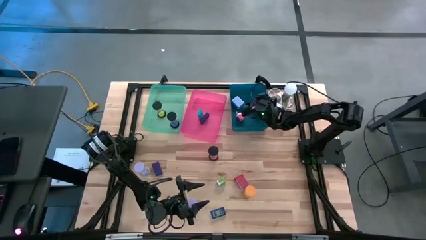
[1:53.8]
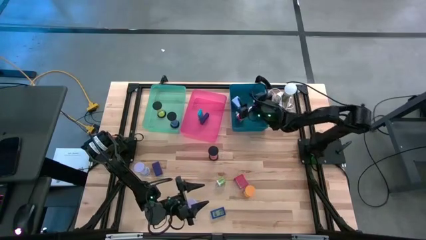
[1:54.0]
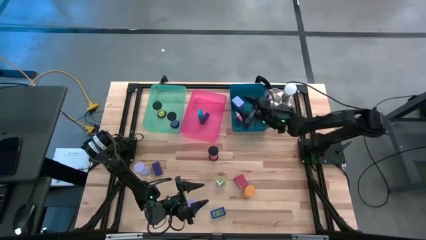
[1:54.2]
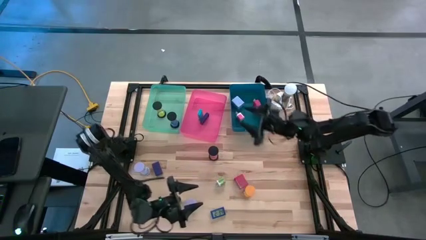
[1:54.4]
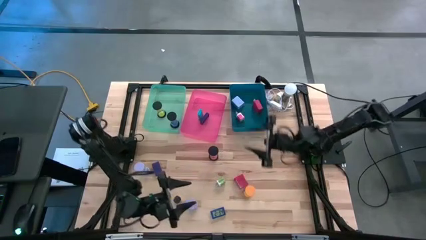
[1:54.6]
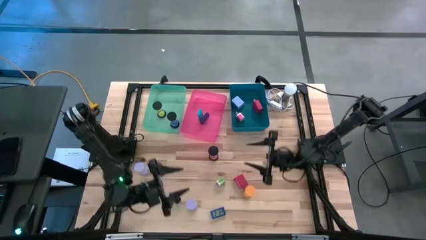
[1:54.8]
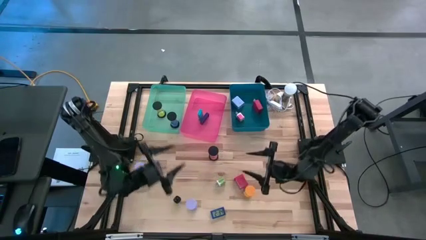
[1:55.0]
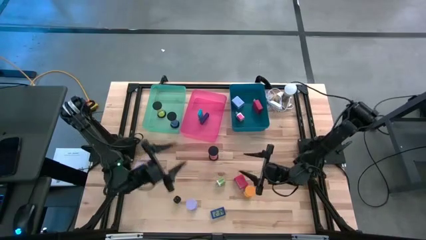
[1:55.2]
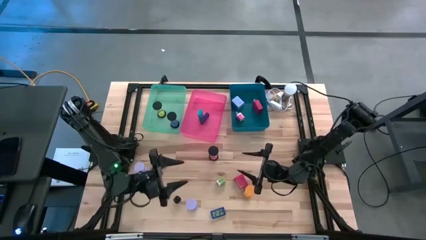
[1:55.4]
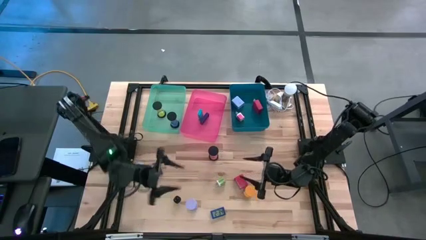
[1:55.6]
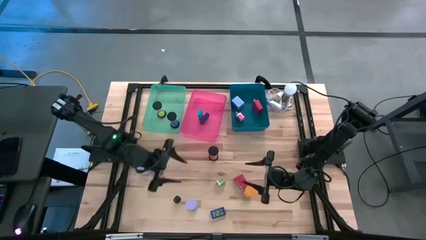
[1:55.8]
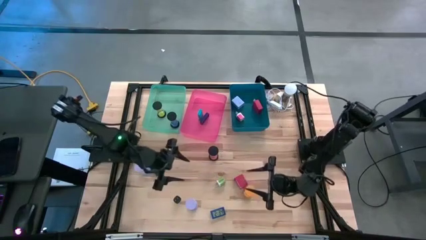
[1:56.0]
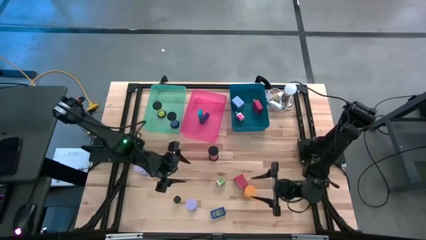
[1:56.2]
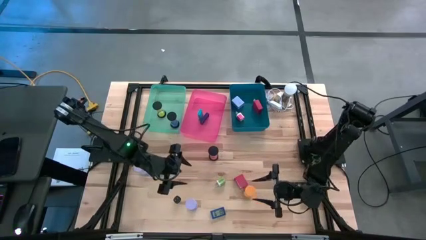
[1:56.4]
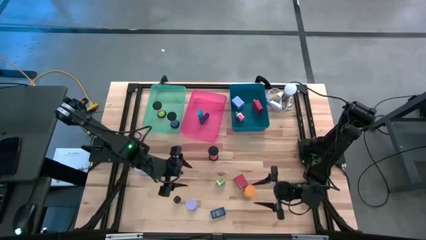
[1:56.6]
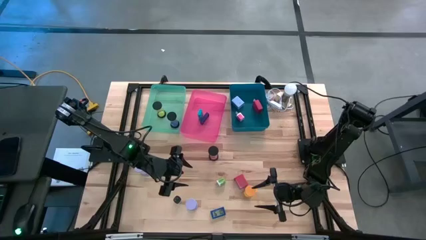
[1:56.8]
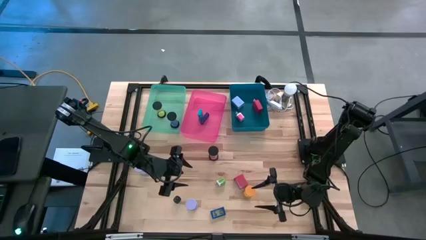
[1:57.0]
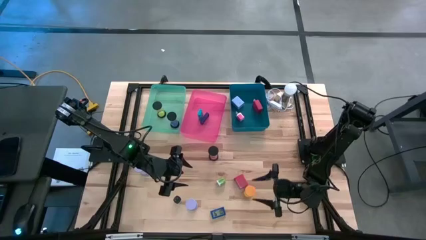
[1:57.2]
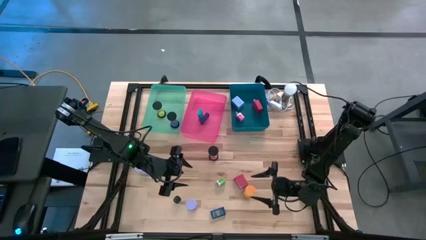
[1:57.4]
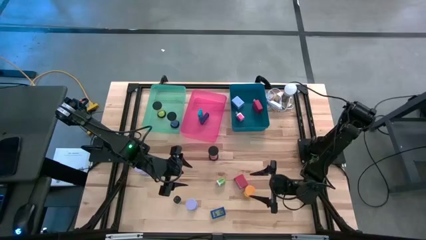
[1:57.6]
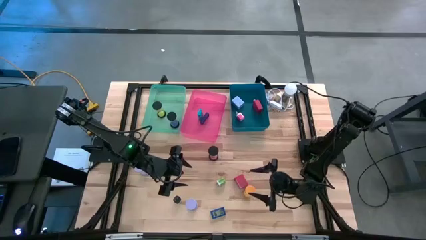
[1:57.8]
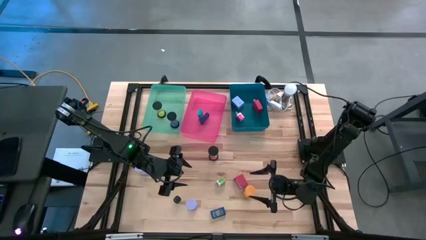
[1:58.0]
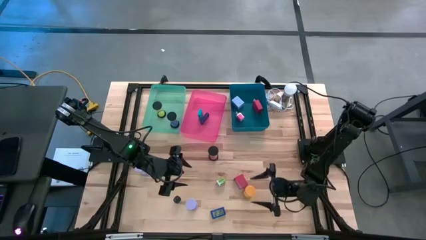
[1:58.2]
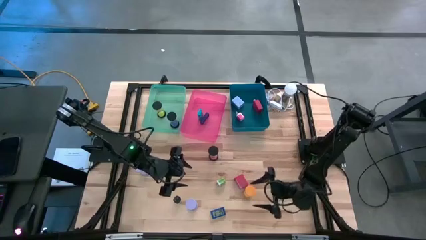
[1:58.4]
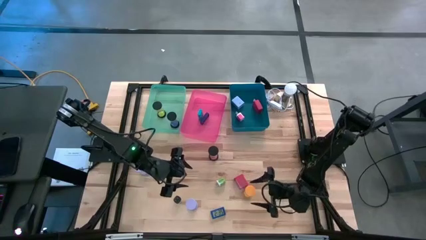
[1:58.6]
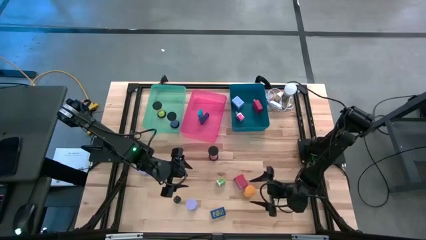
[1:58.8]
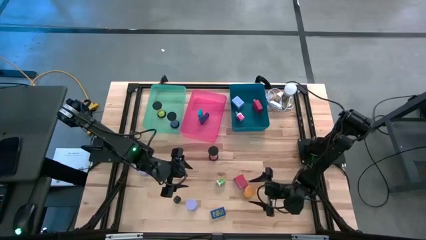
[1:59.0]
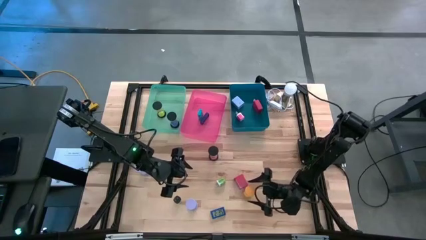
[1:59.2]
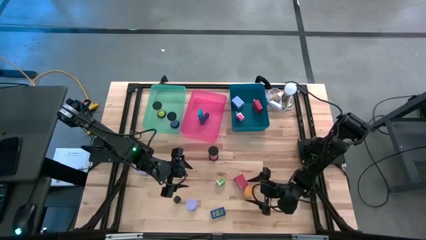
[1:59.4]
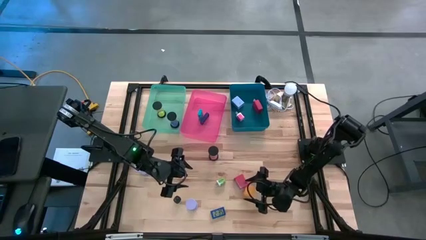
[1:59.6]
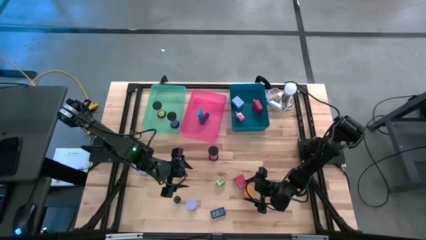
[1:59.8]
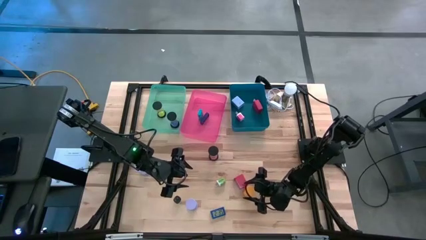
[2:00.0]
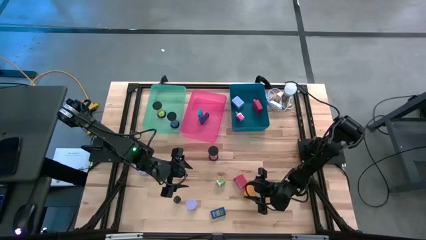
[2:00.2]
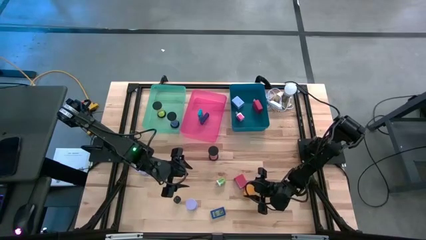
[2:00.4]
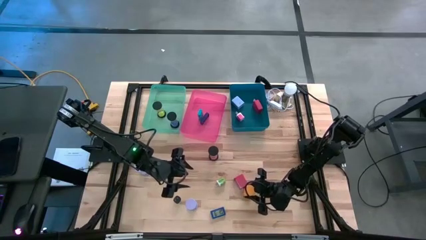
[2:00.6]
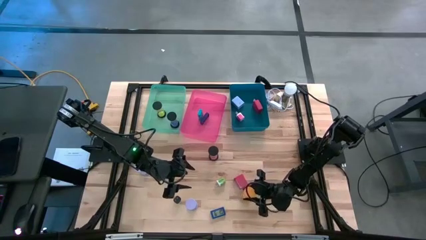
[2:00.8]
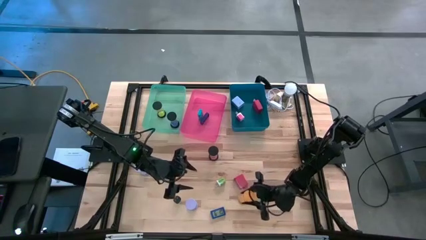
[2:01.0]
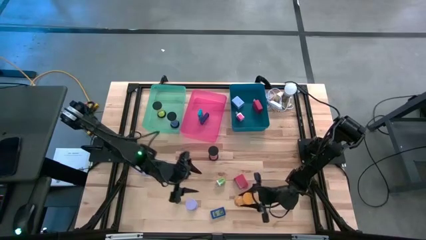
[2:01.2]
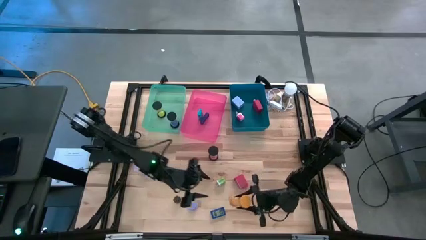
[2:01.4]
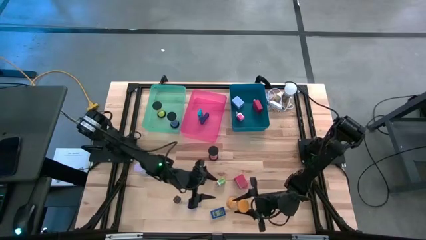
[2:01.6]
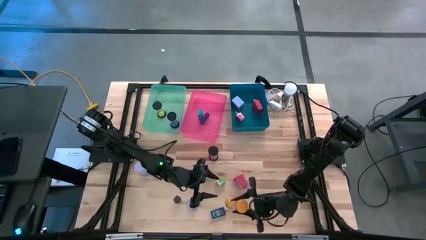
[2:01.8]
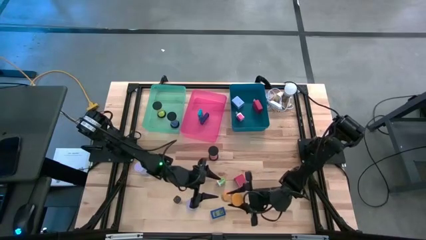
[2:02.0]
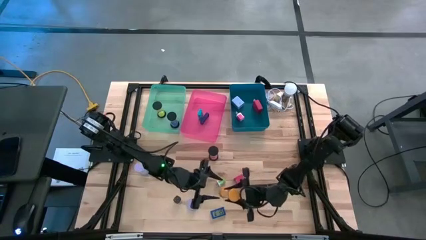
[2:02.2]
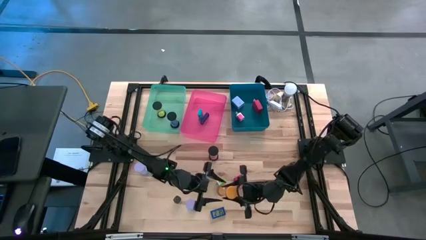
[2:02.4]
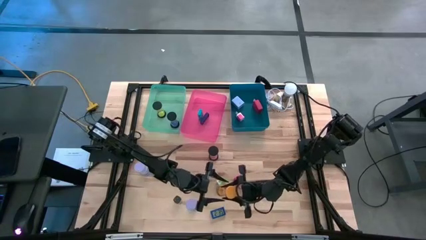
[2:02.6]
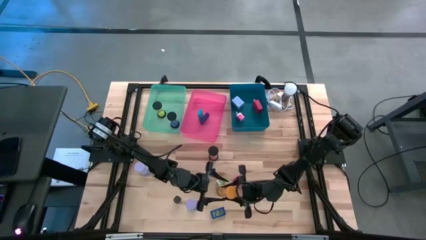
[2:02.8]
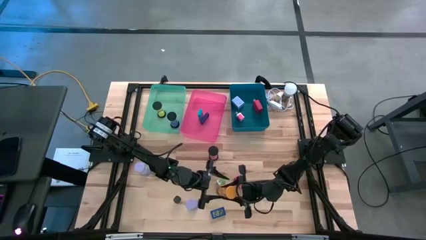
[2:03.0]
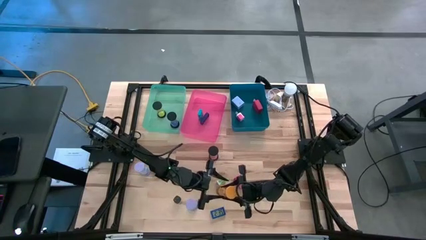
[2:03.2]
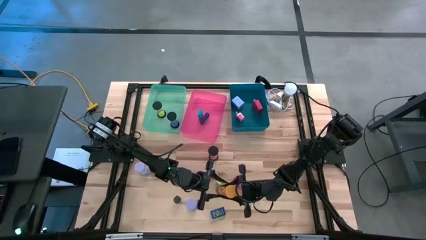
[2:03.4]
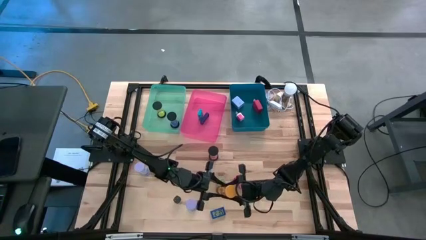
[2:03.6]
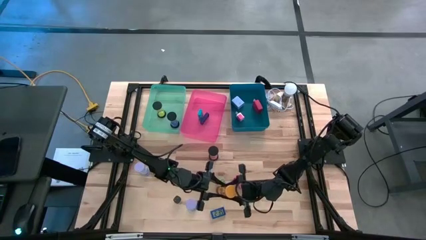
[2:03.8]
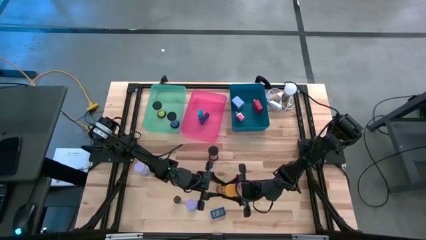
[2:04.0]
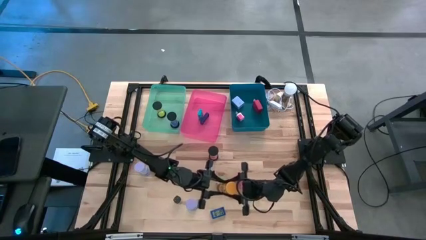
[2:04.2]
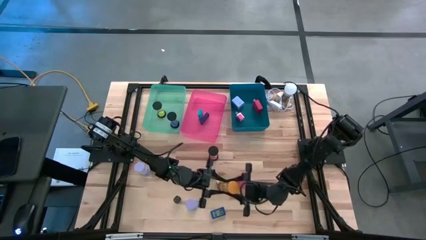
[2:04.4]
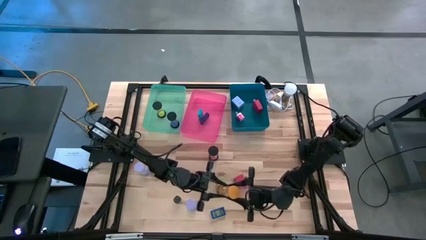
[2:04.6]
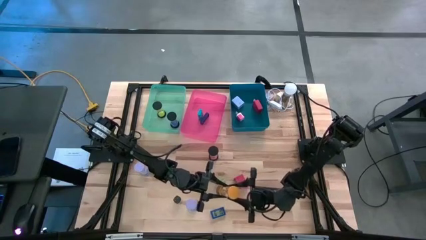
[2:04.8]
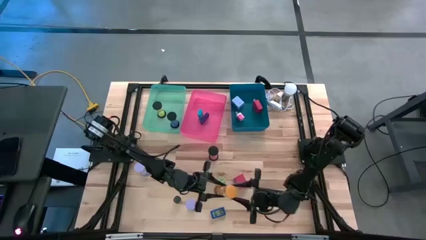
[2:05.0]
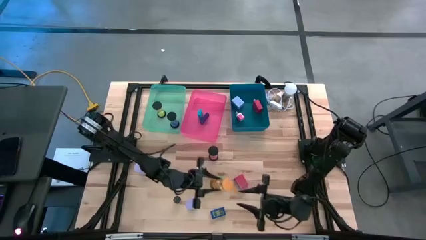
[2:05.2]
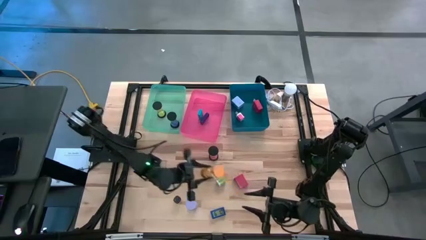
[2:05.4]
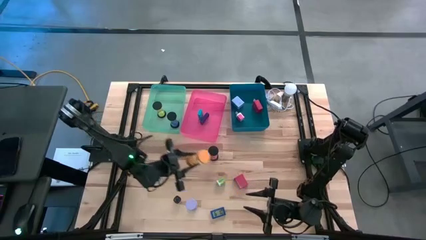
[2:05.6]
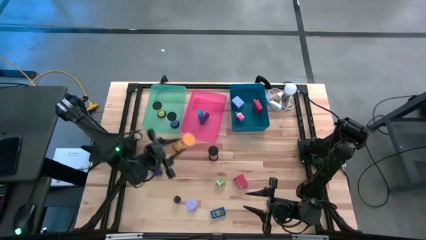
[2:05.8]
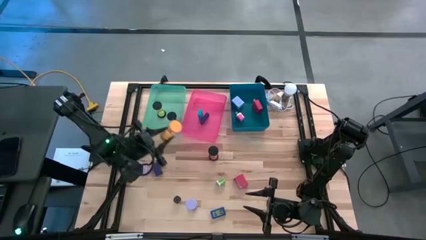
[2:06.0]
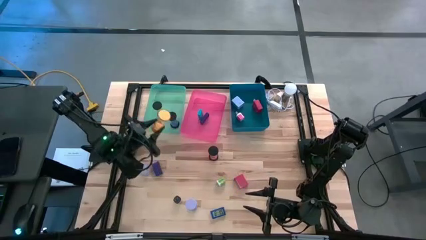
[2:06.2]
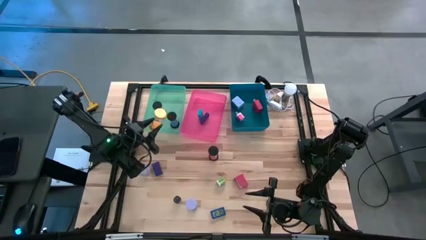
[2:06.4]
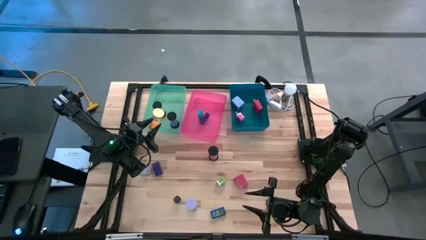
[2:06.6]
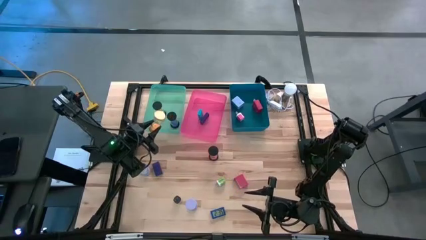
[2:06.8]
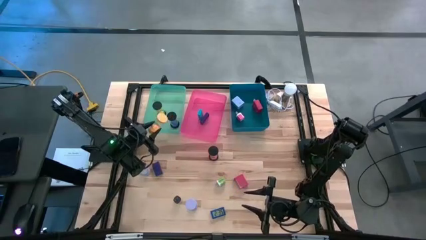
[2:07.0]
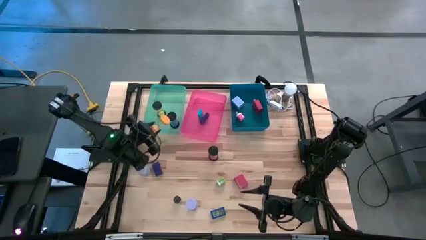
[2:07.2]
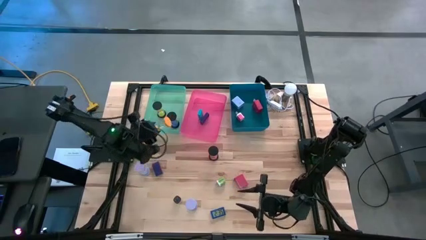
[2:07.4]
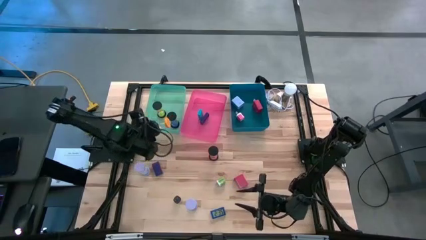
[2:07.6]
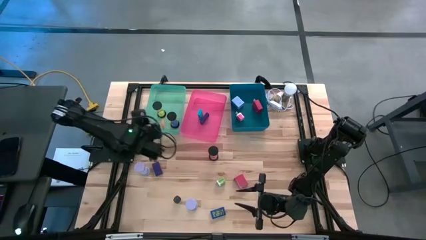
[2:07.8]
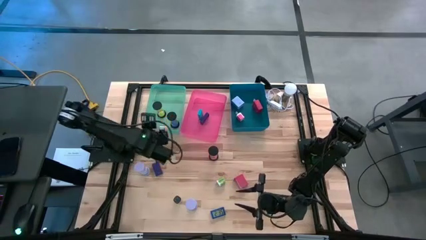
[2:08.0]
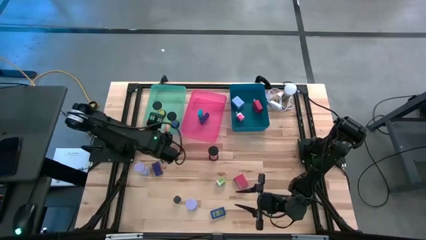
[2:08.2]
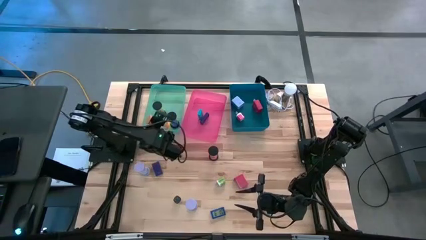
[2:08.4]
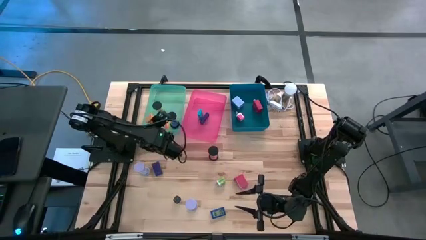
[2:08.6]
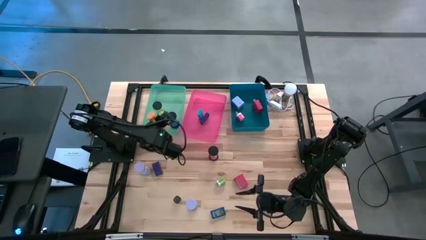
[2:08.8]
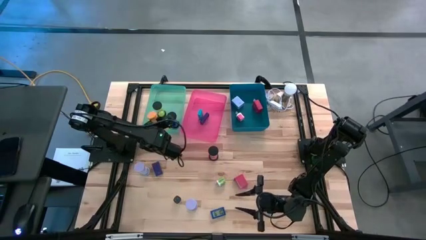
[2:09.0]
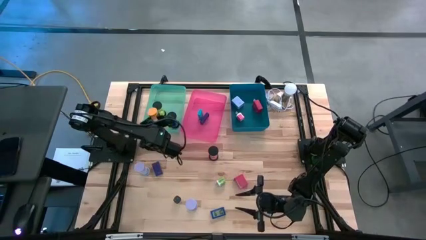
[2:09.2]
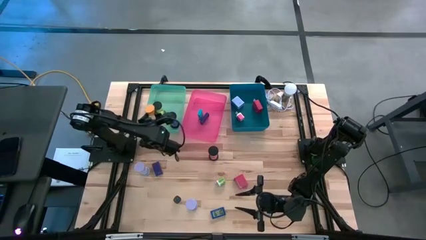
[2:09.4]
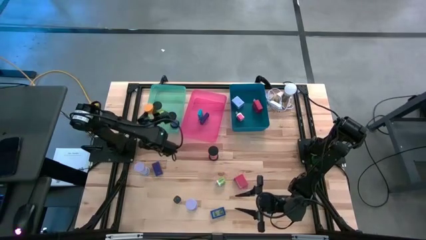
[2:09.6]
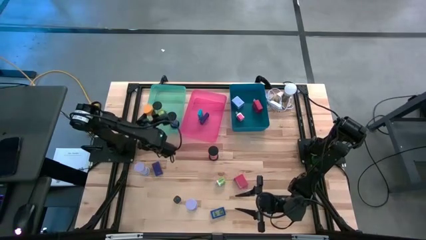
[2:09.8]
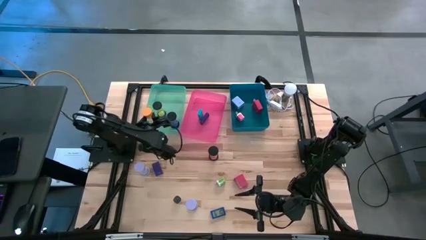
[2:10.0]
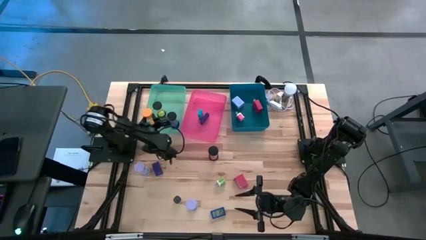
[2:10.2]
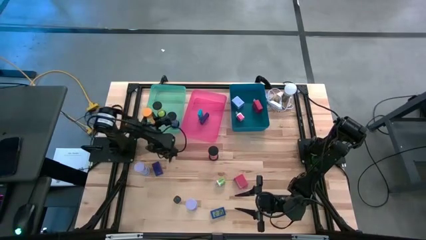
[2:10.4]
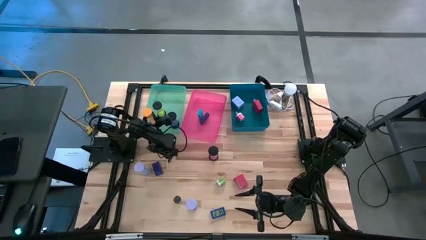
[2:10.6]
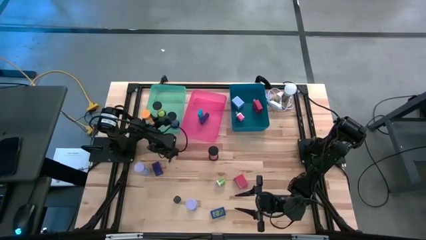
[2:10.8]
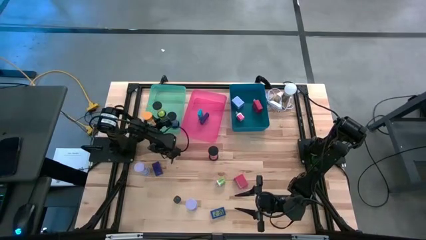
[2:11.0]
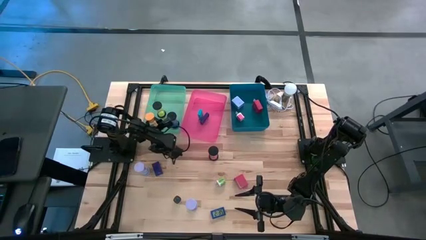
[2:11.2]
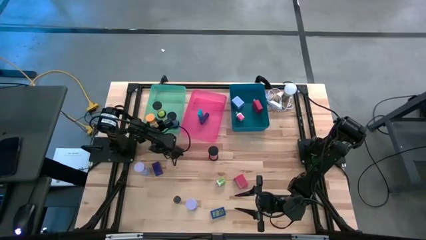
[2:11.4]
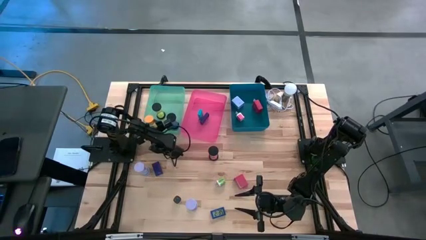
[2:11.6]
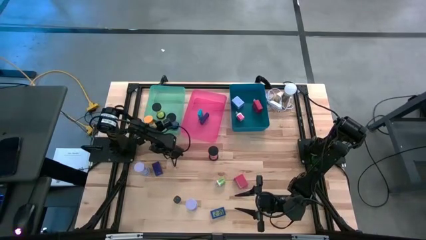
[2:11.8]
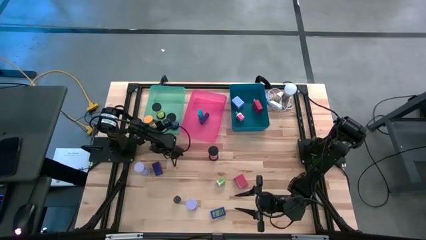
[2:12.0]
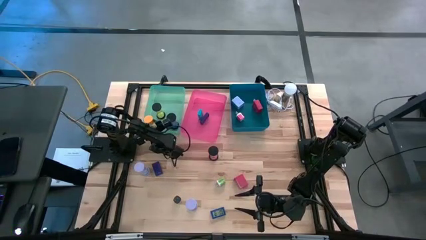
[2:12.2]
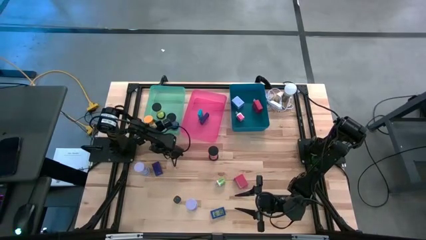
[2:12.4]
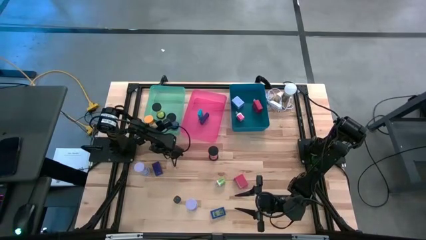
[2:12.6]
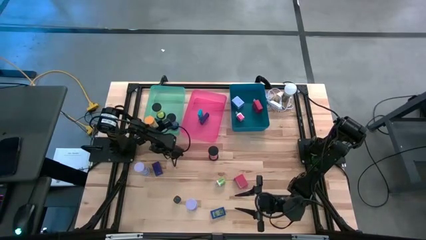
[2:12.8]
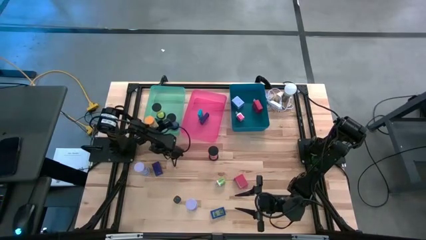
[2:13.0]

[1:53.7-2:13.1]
Task: Pick & Place Office items
Put the yellow hourglass into the green bin
